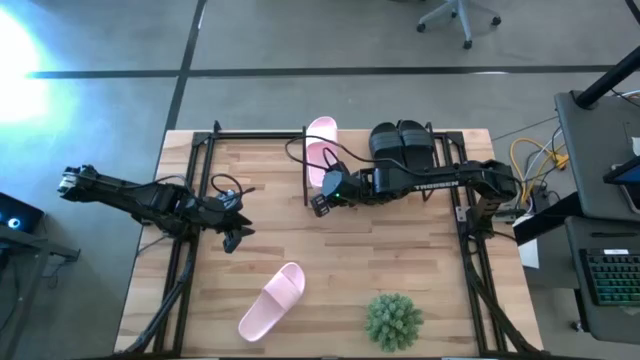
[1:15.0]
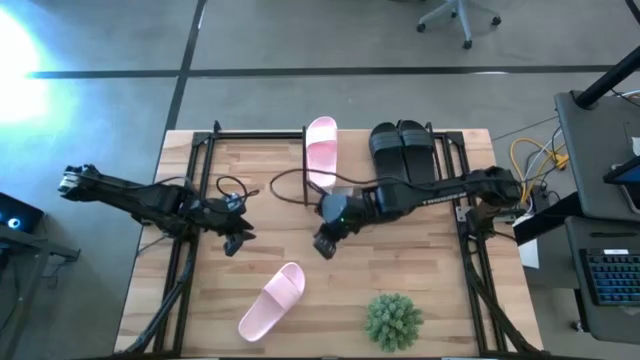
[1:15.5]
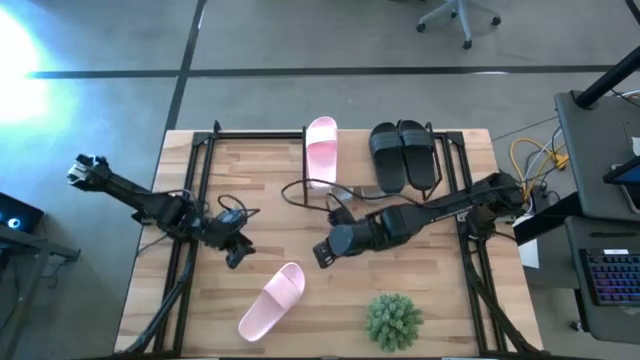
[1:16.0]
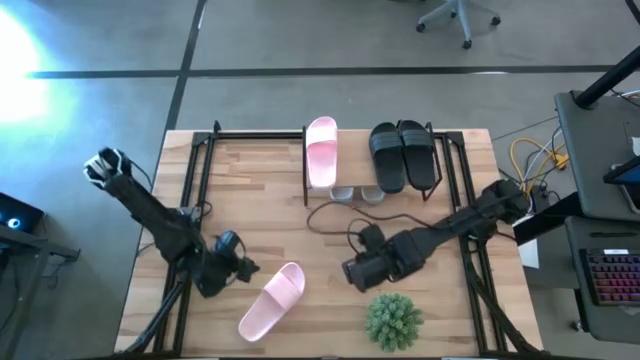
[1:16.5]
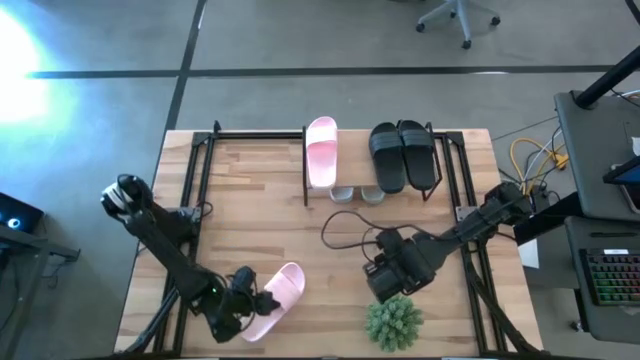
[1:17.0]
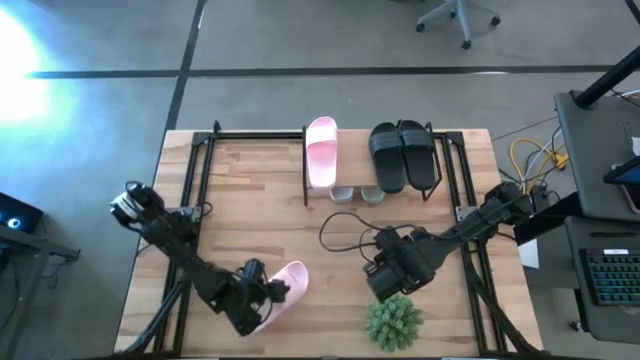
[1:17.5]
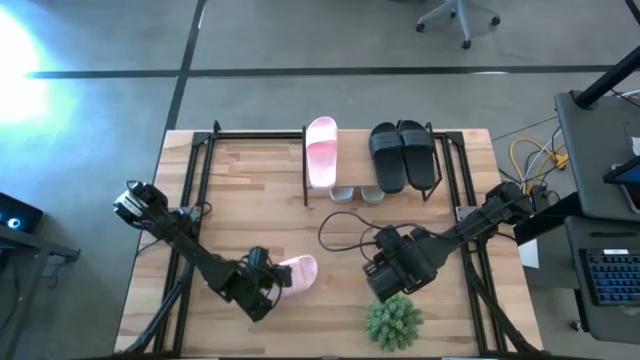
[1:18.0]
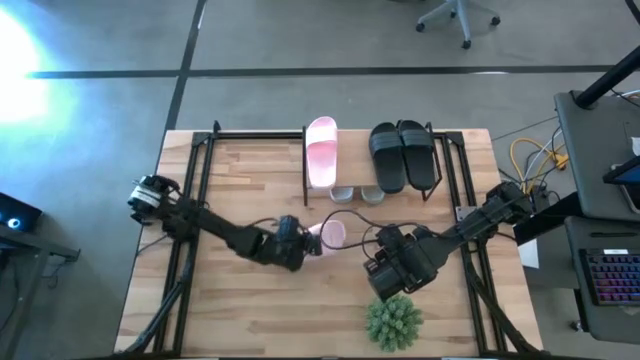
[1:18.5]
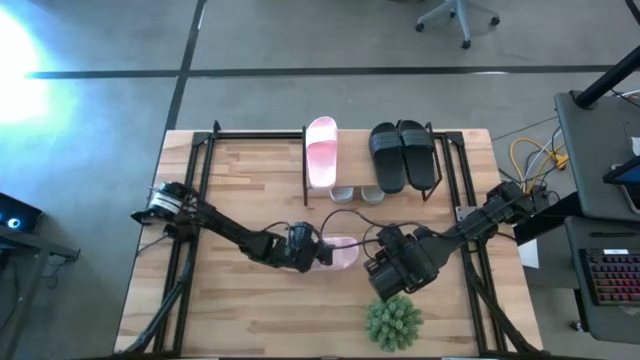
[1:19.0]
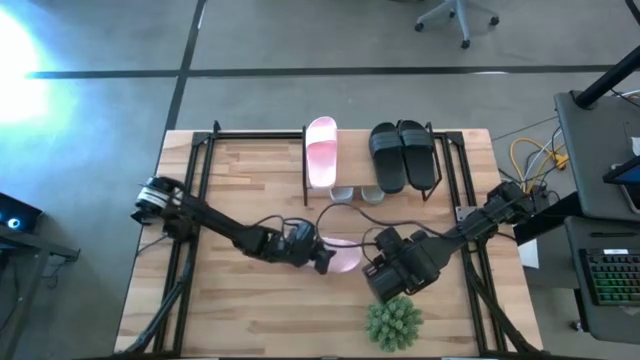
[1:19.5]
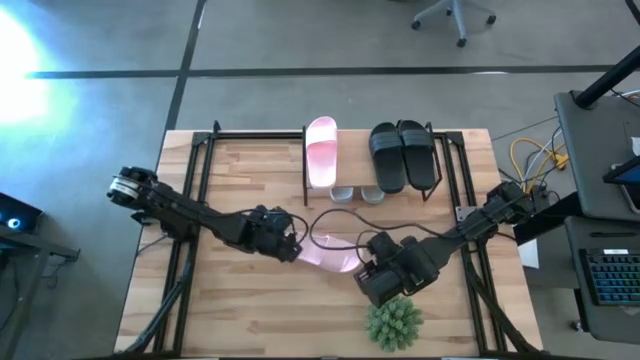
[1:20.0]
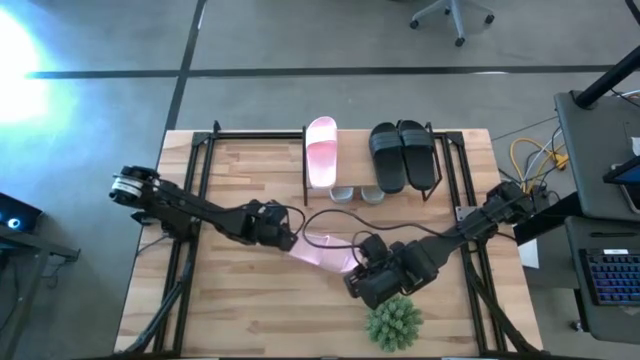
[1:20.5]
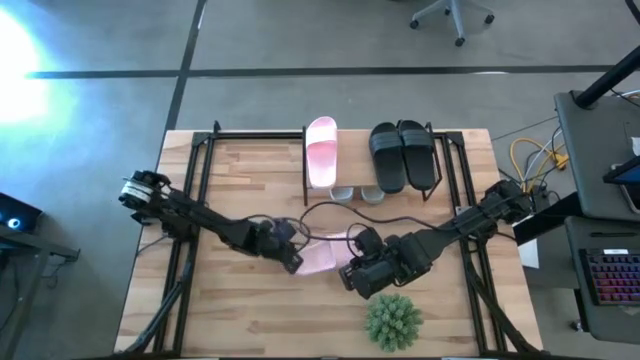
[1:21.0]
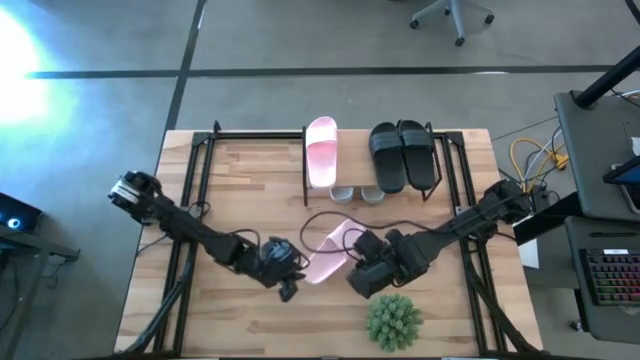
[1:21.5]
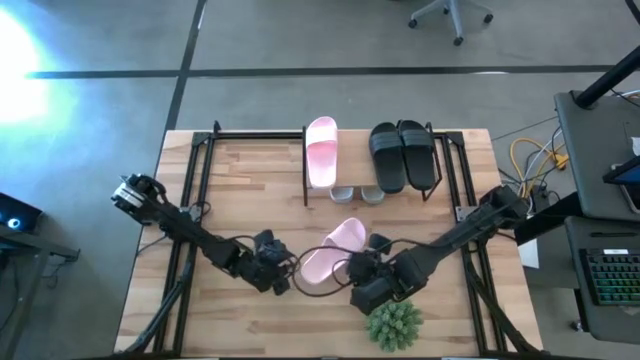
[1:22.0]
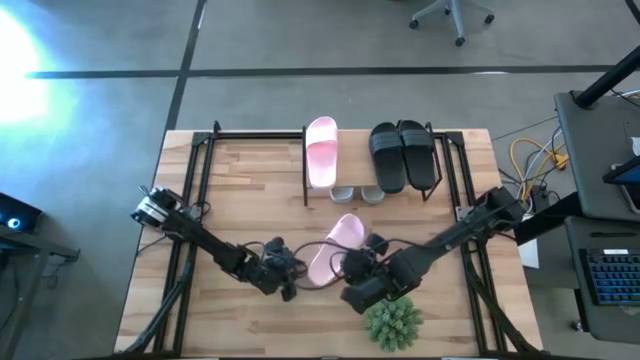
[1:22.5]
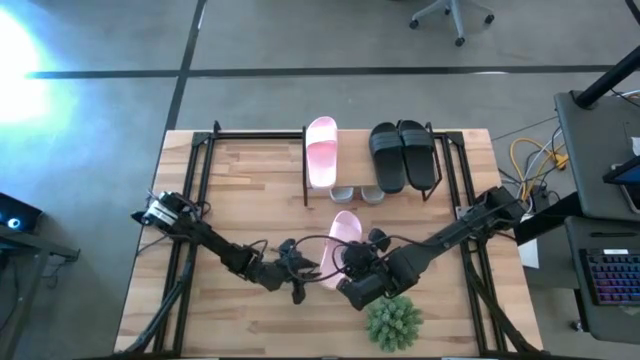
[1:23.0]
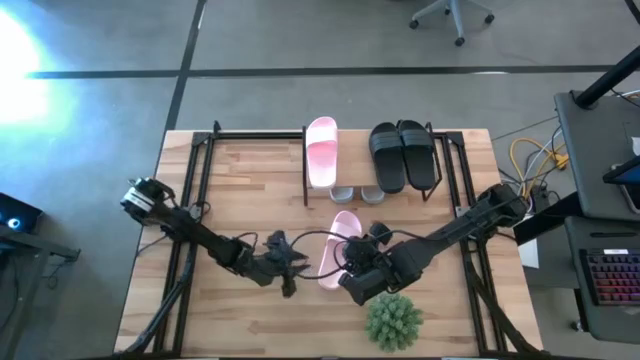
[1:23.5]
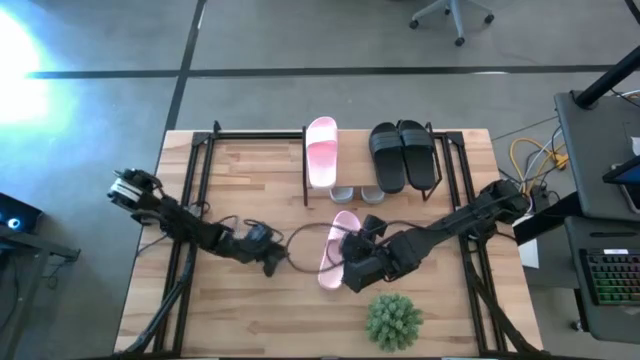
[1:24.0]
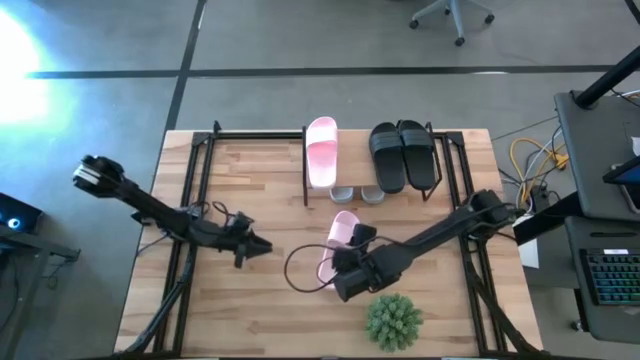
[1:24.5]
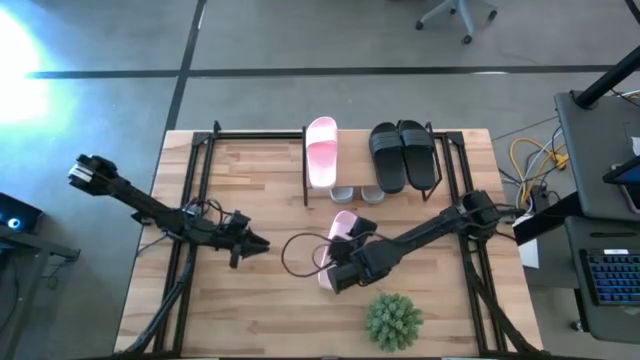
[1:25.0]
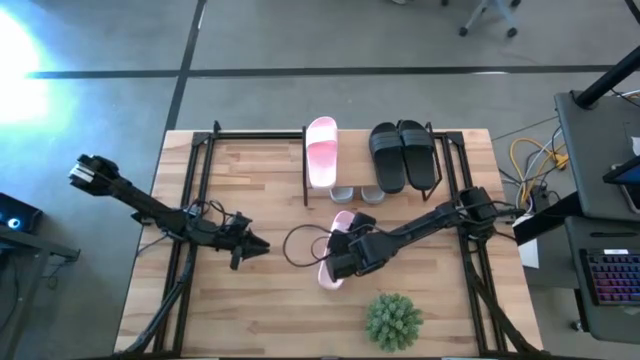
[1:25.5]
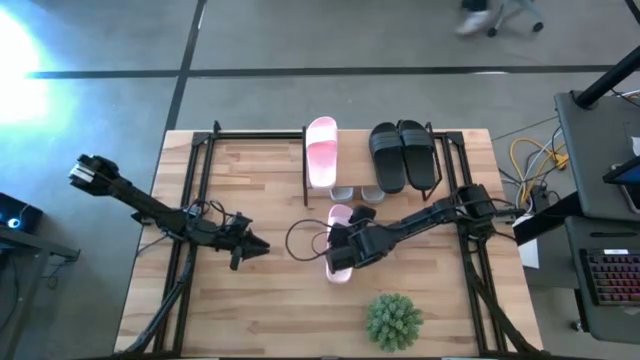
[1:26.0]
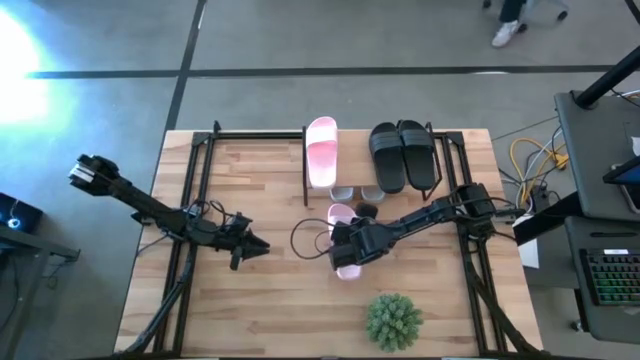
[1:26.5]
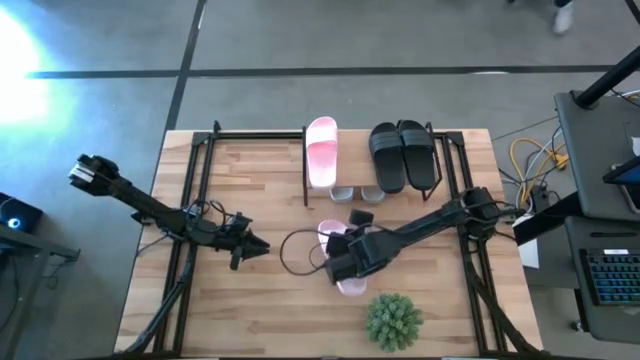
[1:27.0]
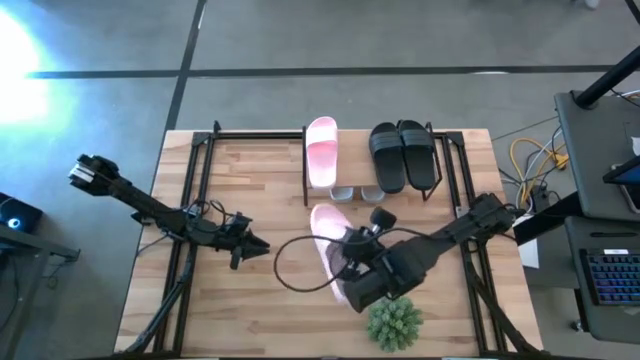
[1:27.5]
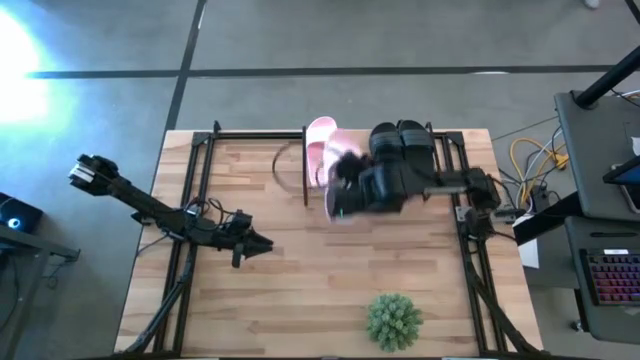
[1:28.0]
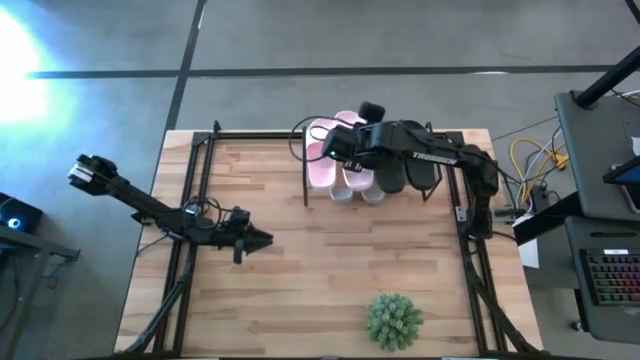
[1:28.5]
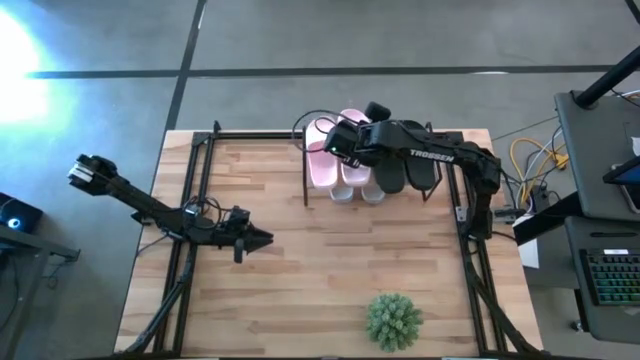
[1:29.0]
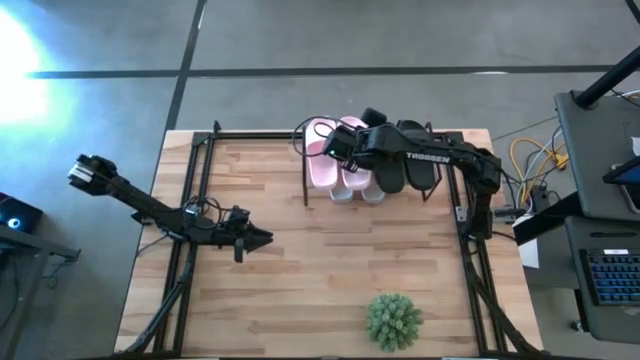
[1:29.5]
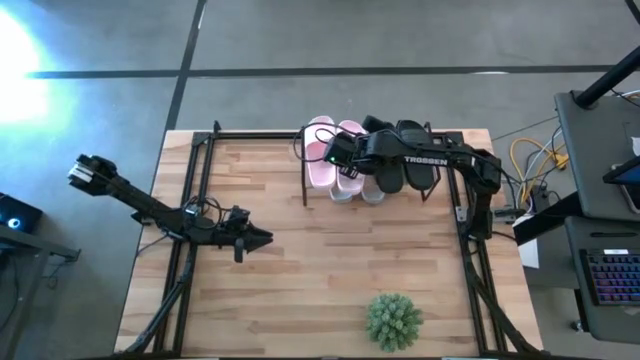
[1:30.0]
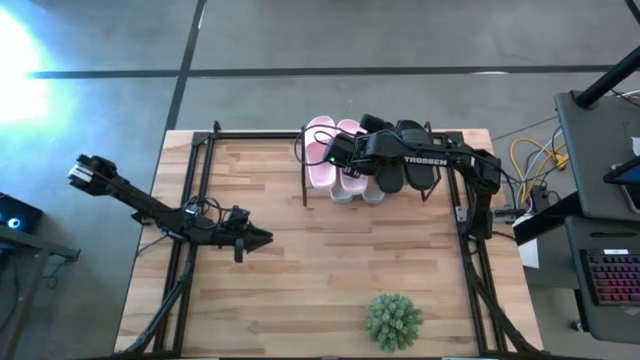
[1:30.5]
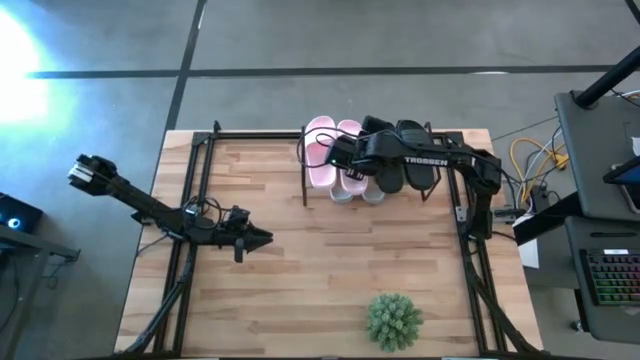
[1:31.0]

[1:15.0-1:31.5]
Task: Pick and place slides into the shelf
Put the pink slides on the shelf

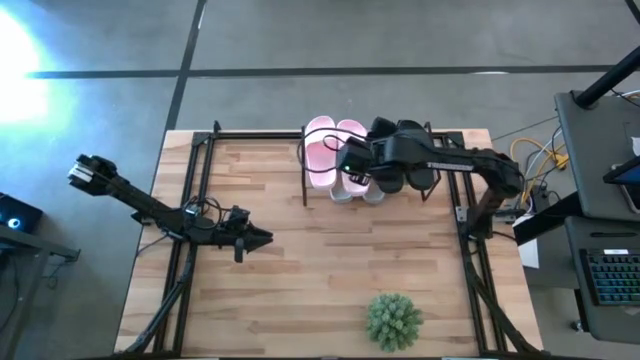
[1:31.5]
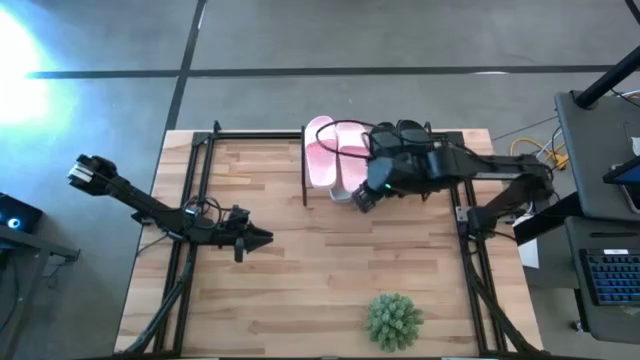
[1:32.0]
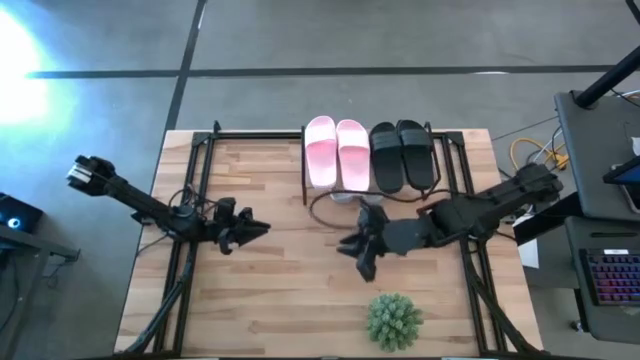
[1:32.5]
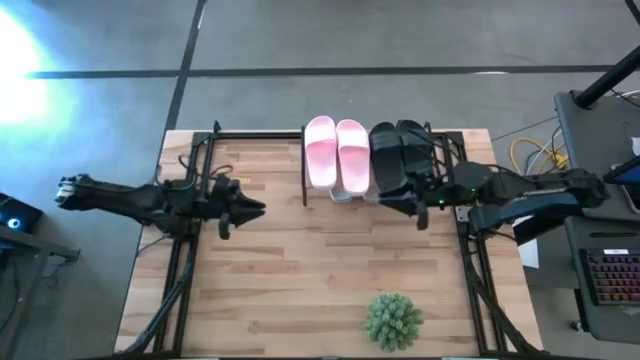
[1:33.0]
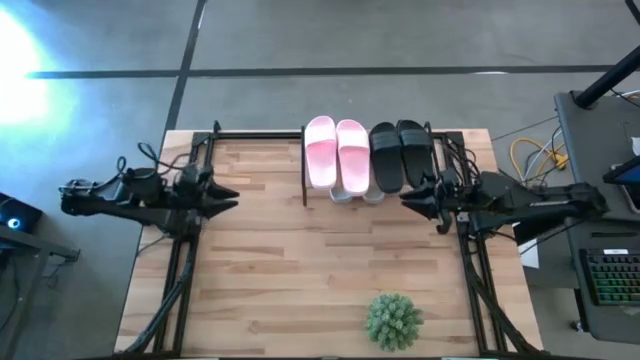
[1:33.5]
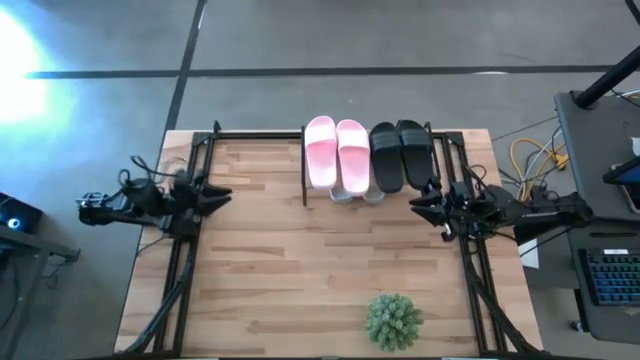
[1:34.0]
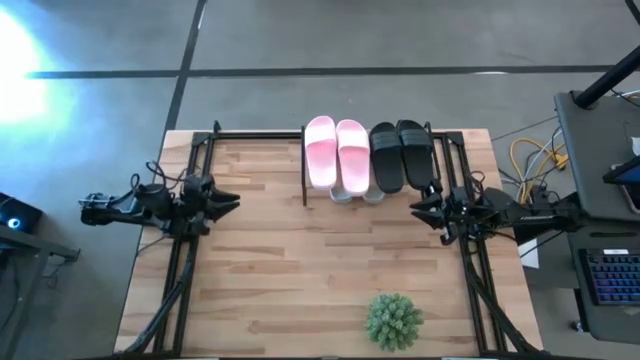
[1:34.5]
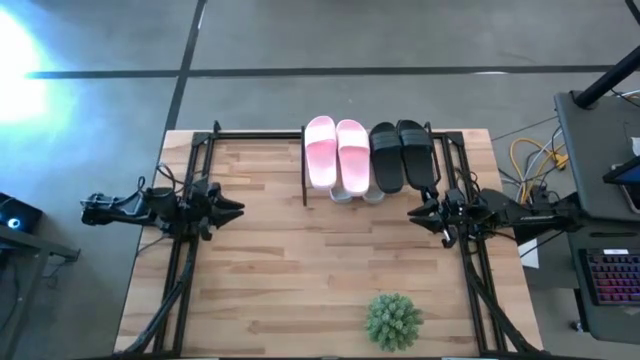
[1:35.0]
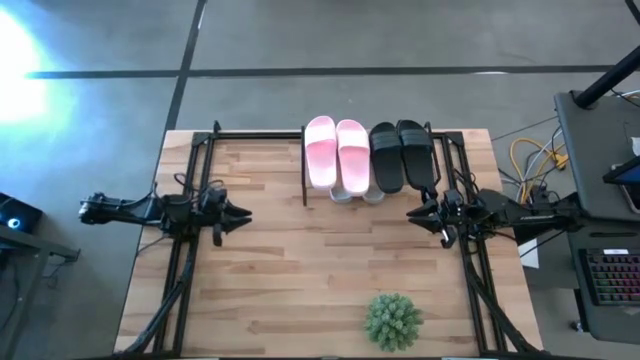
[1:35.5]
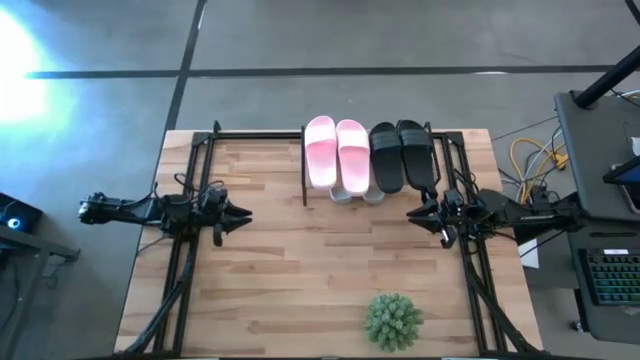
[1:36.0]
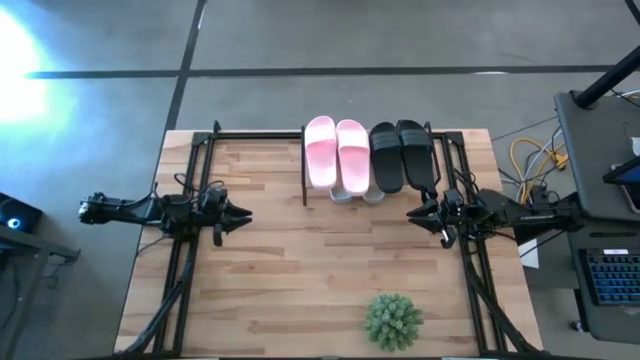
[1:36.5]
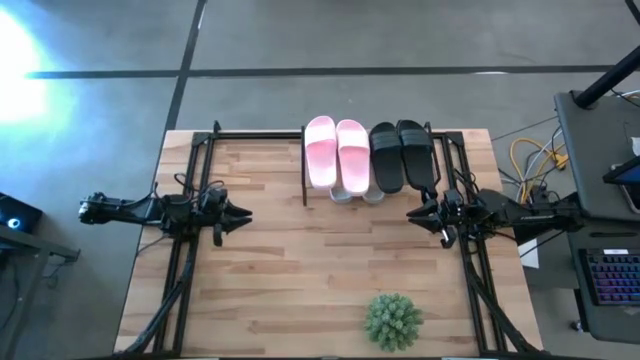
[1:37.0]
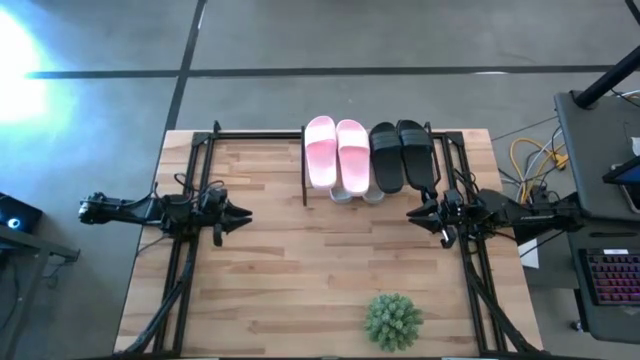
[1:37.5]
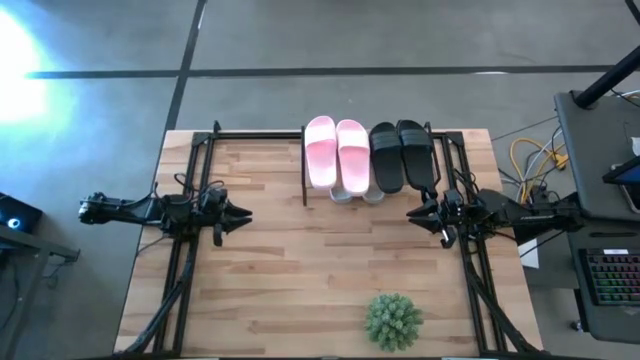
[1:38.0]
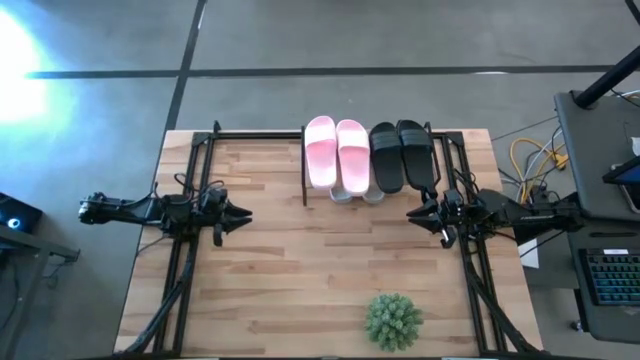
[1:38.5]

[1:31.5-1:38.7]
Return to Home Position
